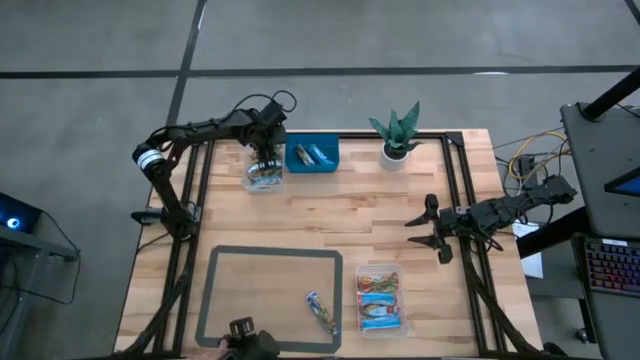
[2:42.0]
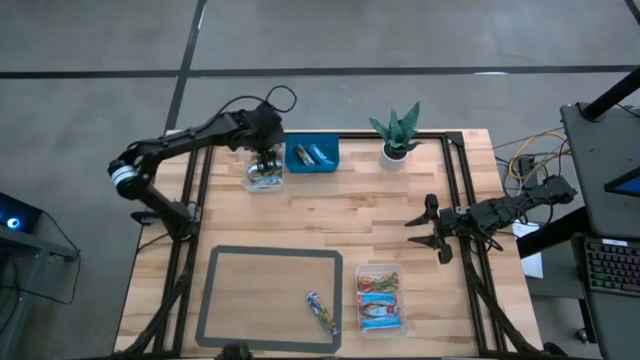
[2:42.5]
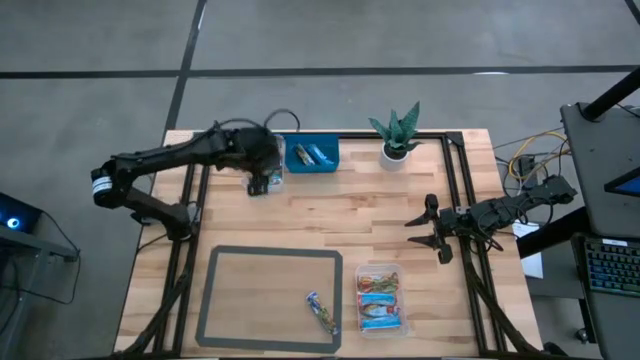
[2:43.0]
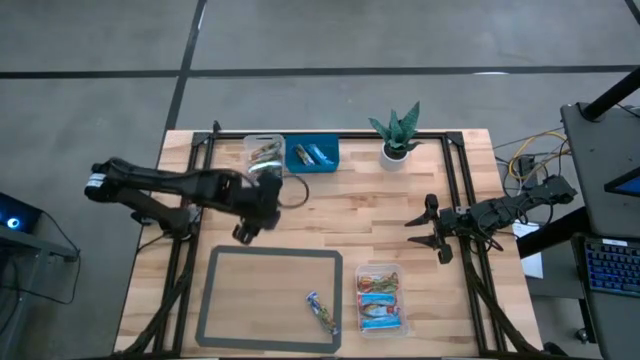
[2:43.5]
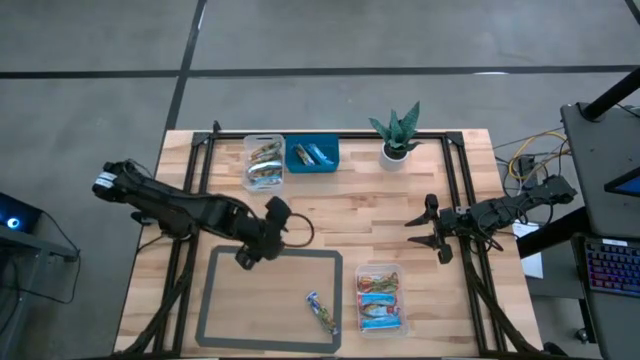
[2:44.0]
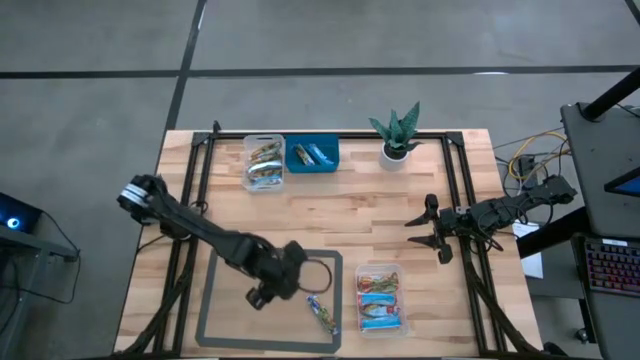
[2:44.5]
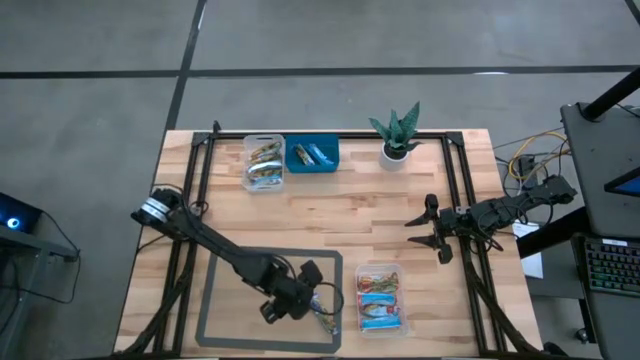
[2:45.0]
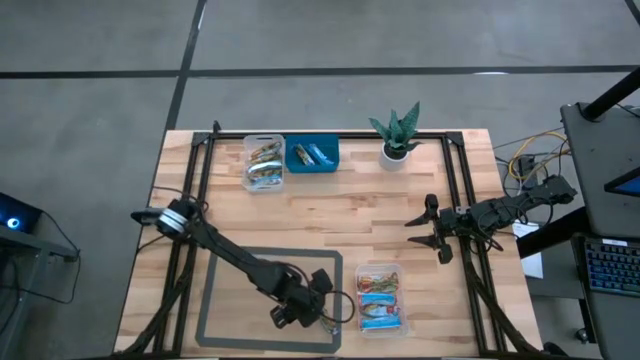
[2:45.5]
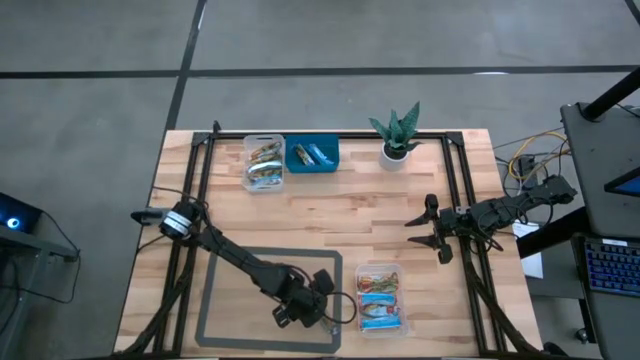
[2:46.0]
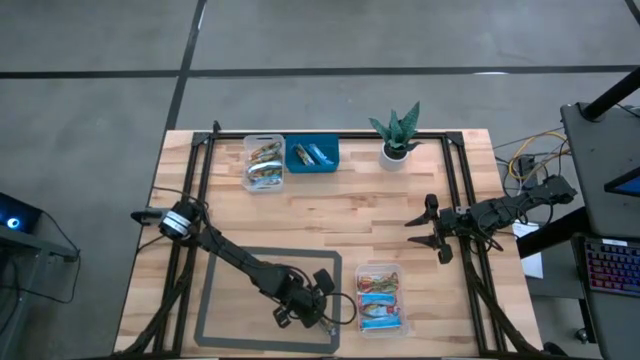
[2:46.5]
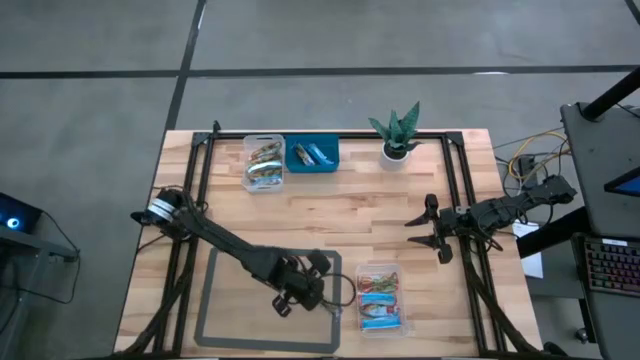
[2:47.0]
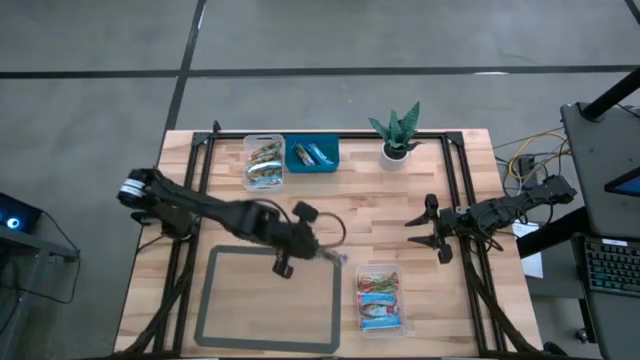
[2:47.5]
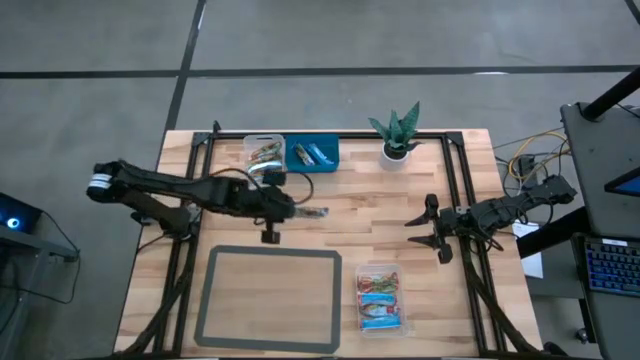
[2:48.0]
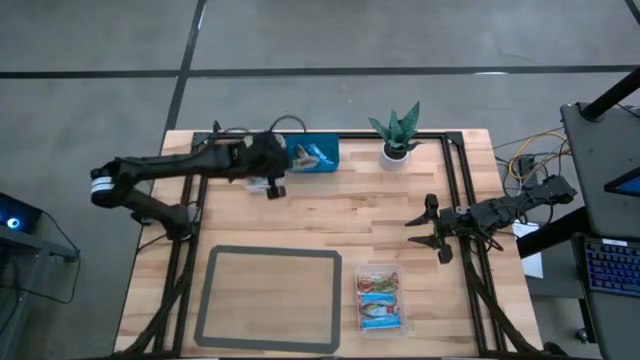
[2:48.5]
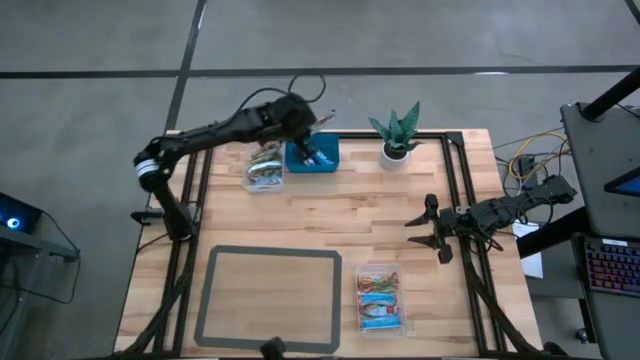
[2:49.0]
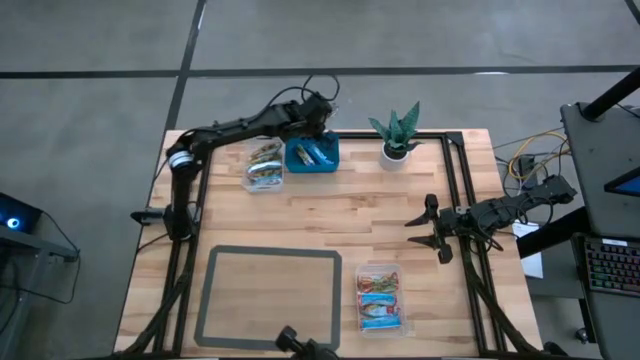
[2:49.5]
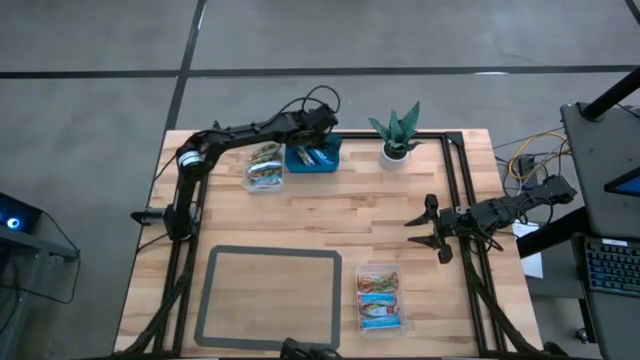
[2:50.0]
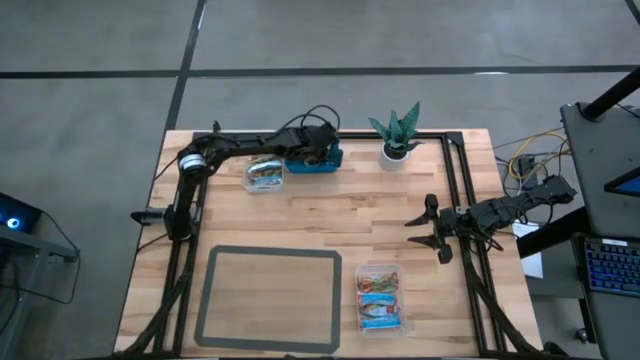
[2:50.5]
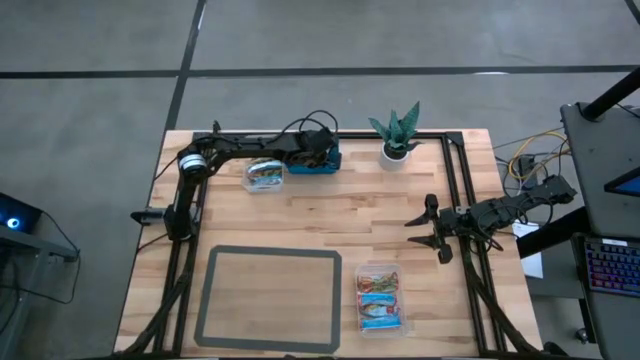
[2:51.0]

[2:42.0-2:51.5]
Task: Pick and place Granola Bars by type
Put the blue granola bar into the blue bin

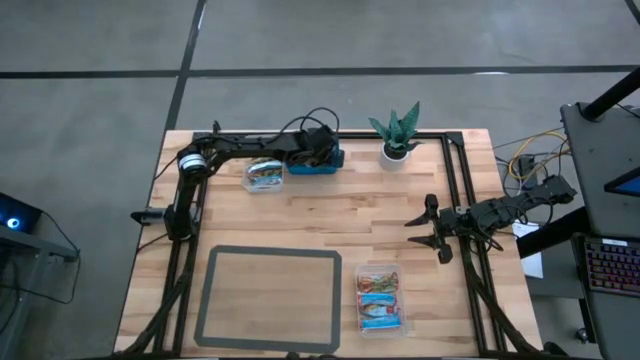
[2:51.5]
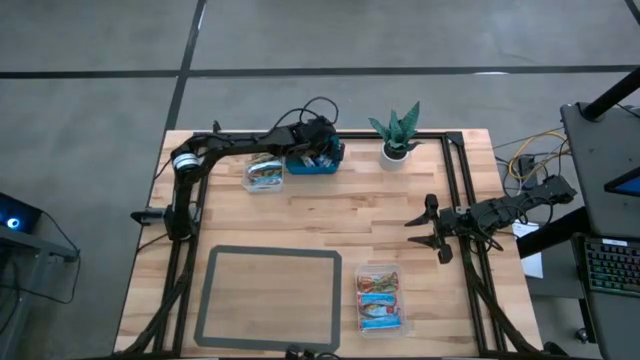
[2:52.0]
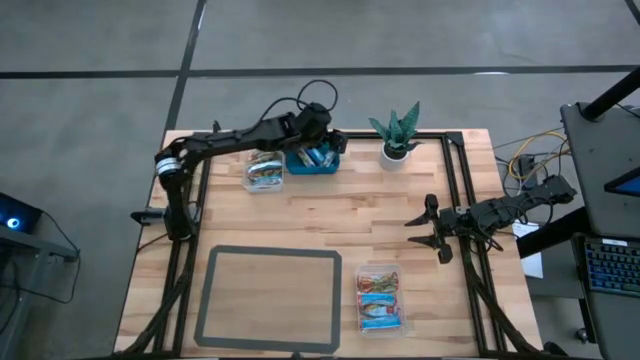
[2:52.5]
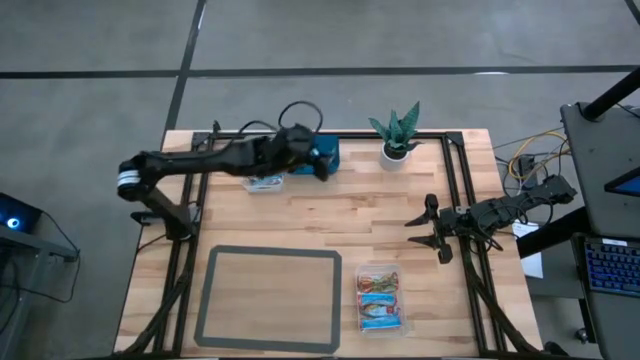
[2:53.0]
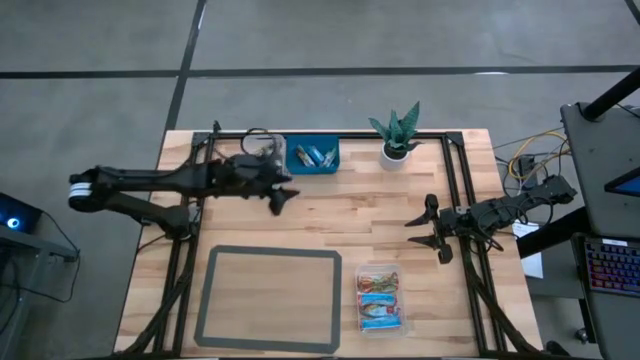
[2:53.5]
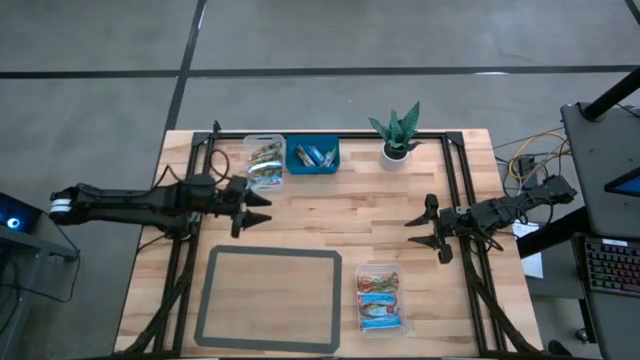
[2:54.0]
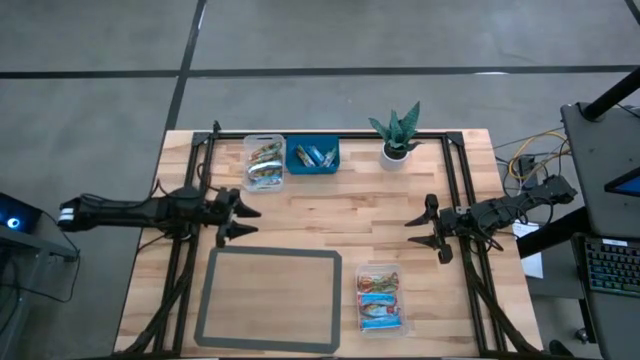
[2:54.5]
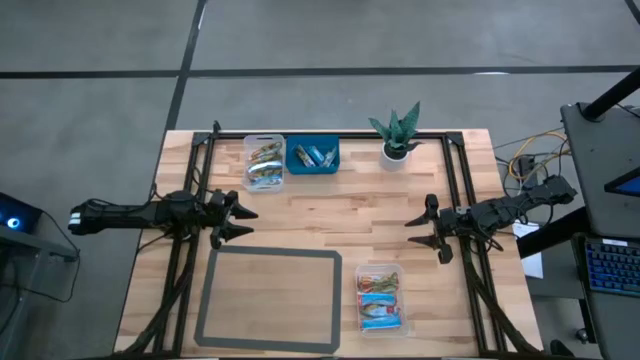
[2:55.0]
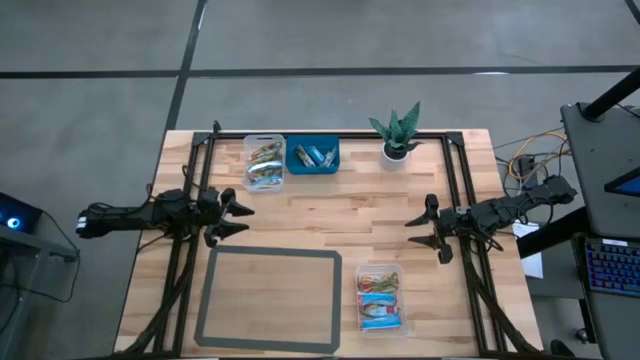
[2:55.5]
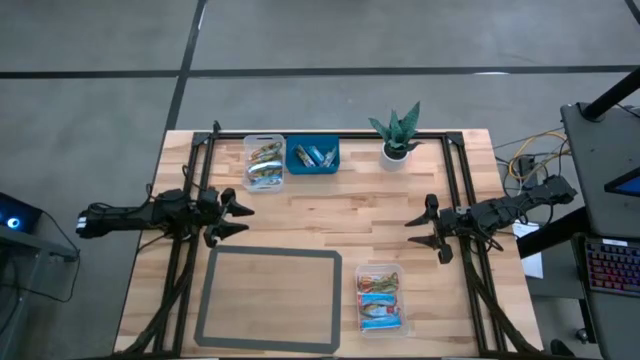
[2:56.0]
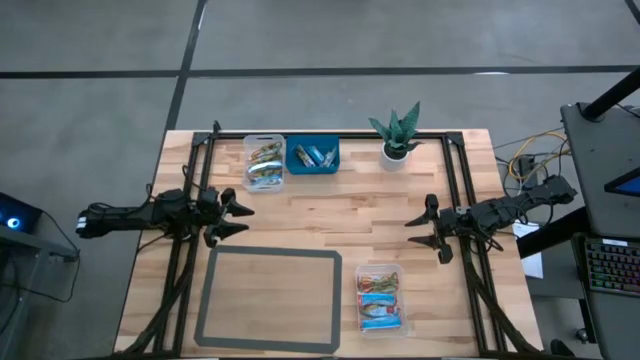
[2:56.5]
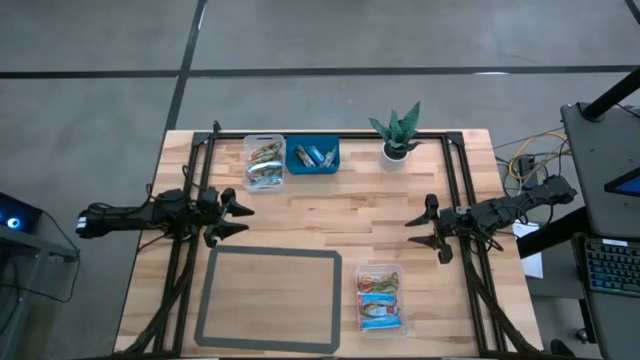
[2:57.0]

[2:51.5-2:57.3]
Return to Home Position

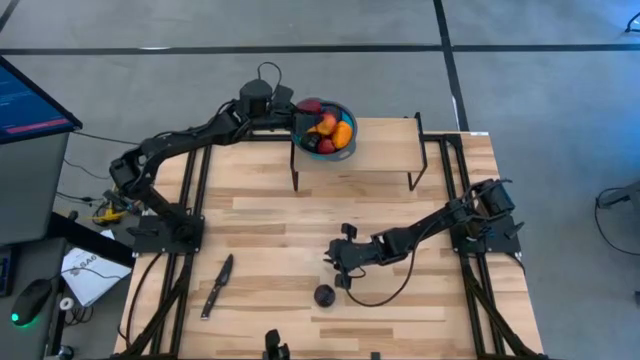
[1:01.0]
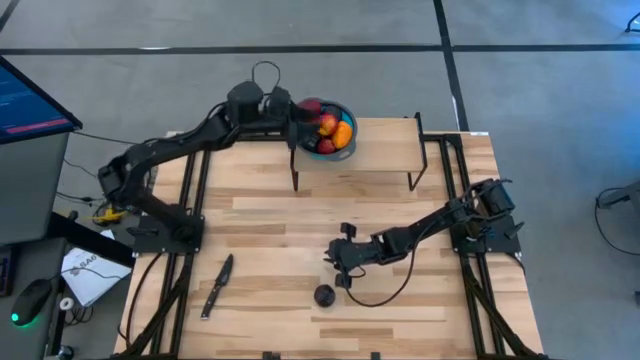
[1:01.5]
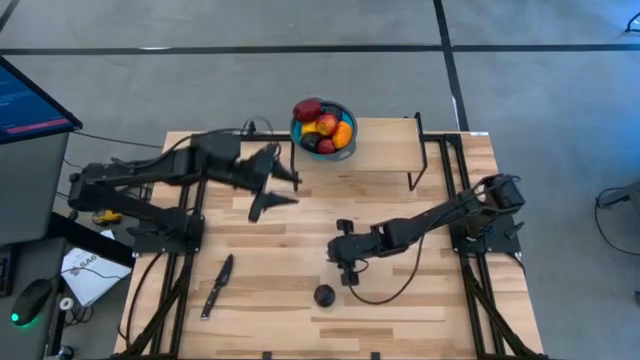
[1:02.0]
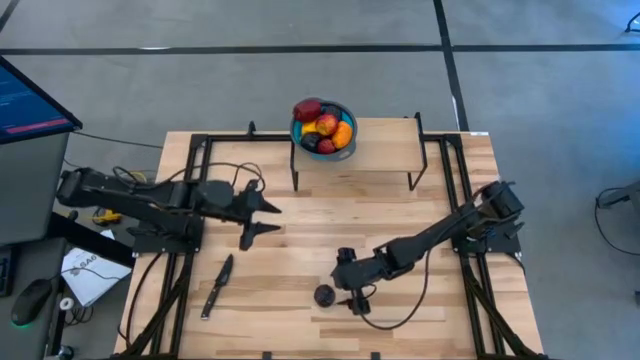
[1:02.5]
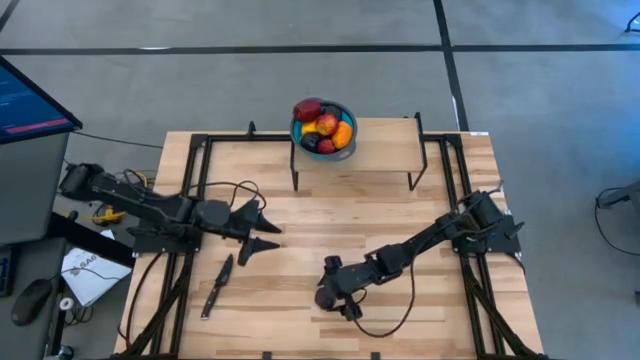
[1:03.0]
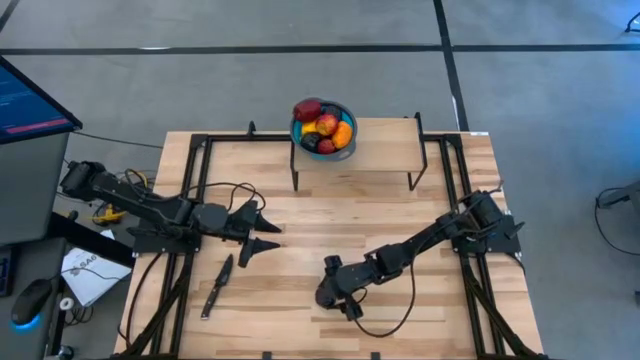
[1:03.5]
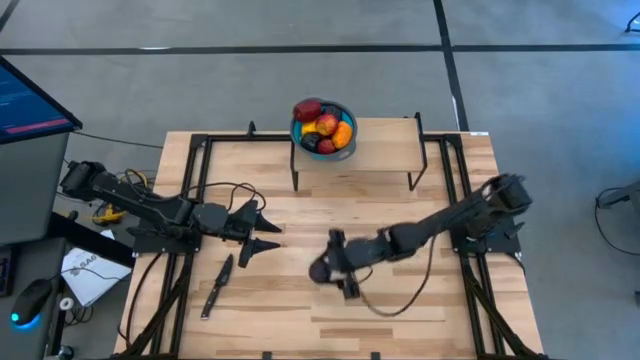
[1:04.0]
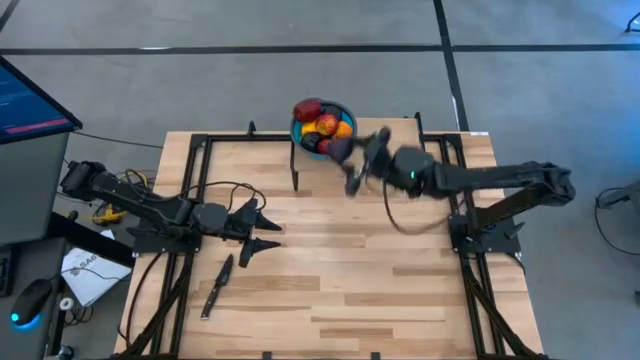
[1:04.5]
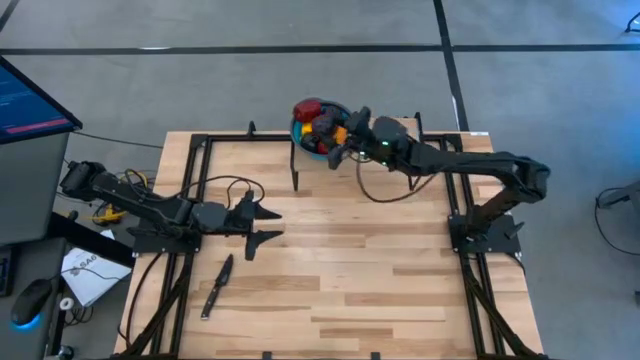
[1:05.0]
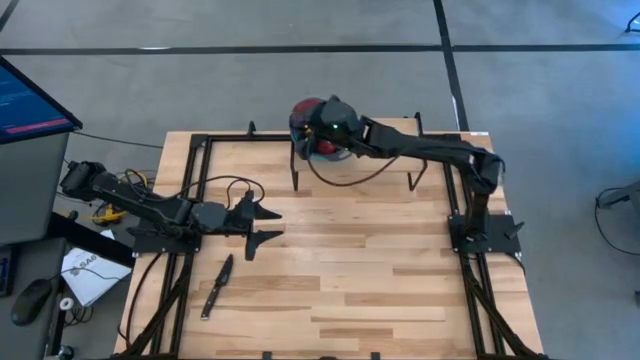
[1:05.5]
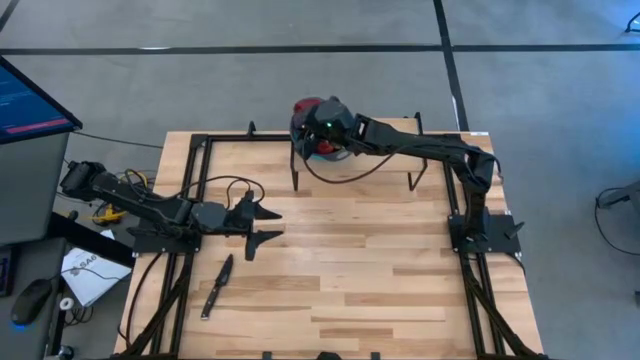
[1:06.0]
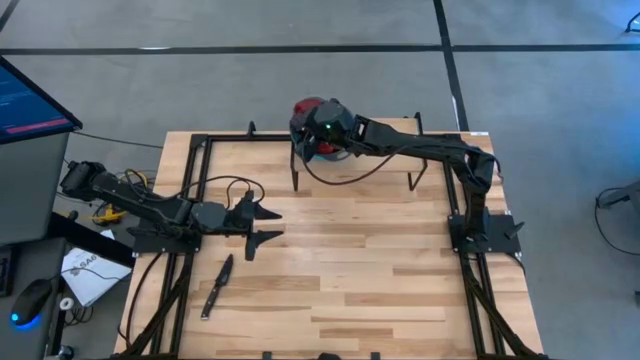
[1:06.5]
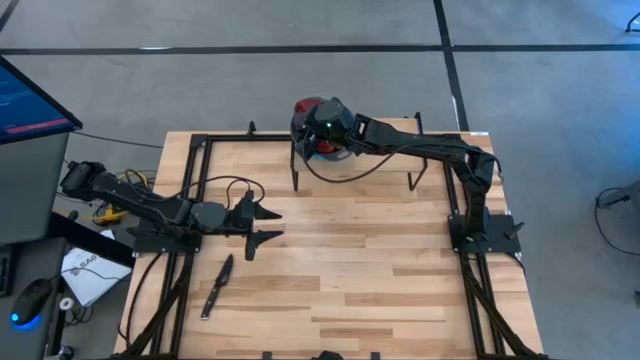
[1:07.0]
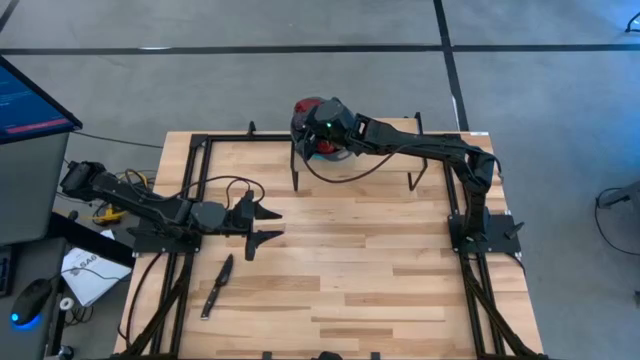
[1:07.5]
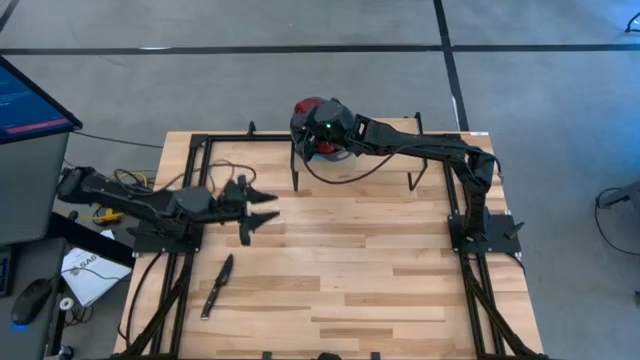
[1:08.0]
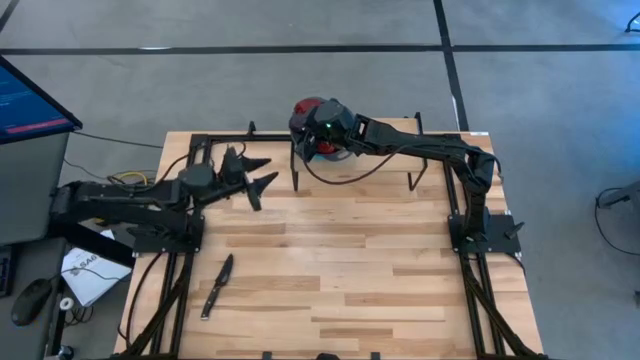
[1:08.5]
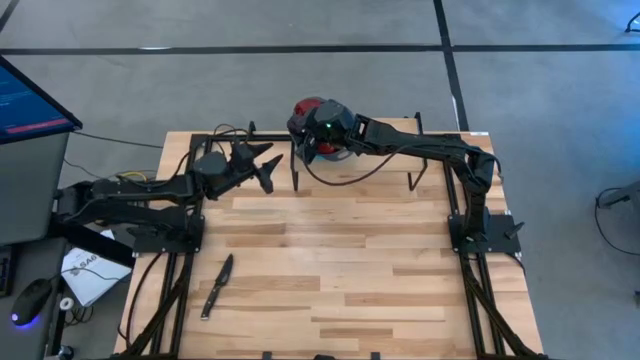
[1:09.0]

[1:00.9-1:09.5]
Task: Pick & Place Fruit
Put the purple plum into the blue strainer bowl on the shelf
